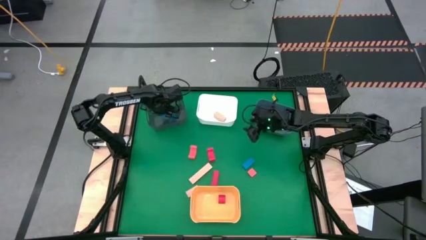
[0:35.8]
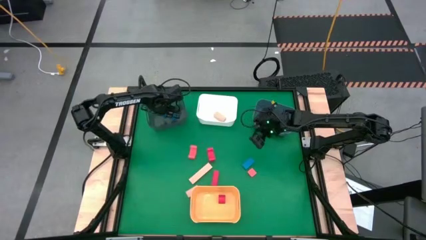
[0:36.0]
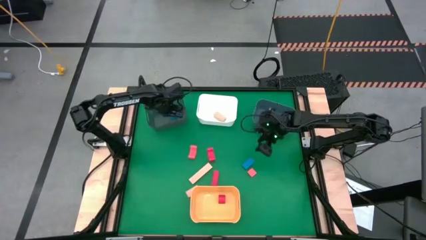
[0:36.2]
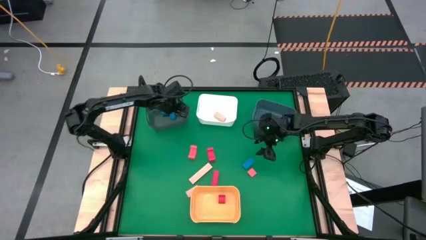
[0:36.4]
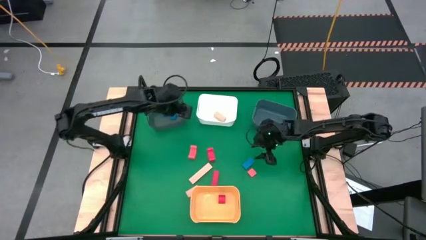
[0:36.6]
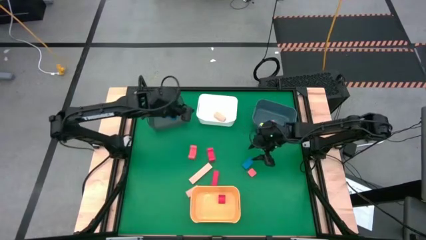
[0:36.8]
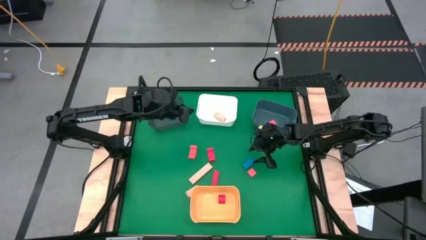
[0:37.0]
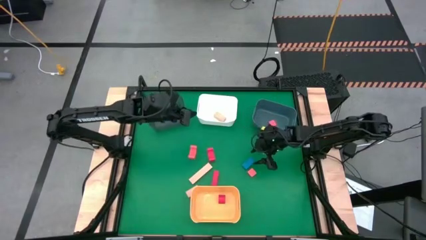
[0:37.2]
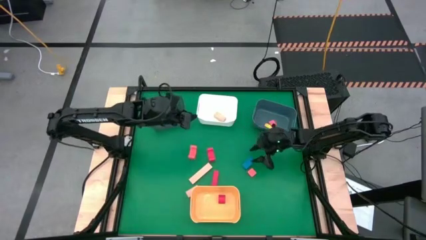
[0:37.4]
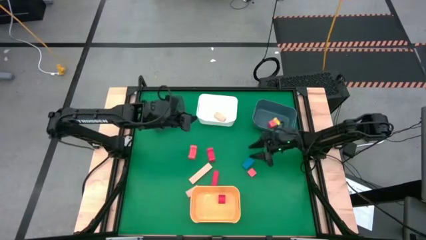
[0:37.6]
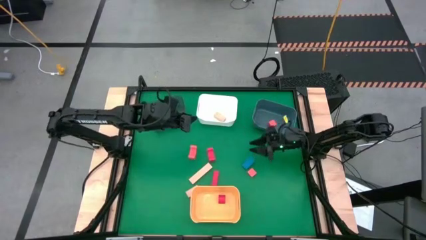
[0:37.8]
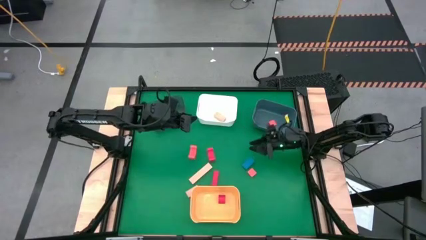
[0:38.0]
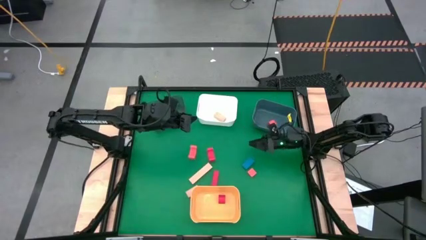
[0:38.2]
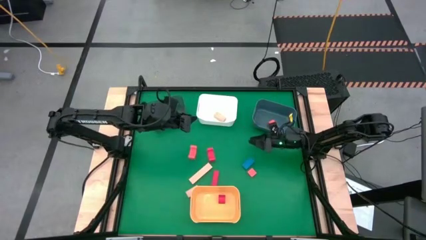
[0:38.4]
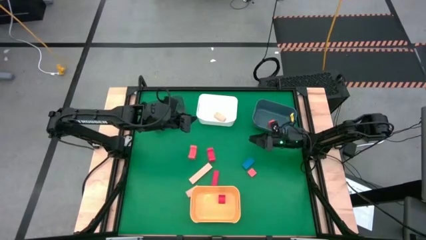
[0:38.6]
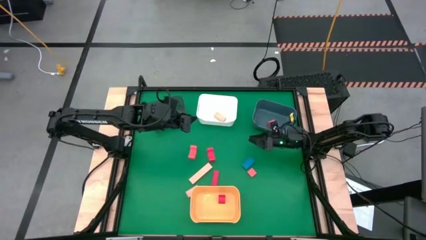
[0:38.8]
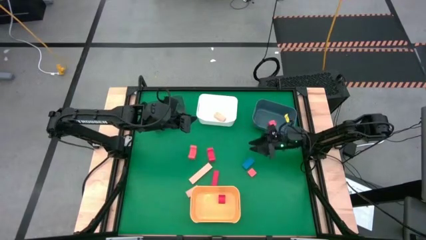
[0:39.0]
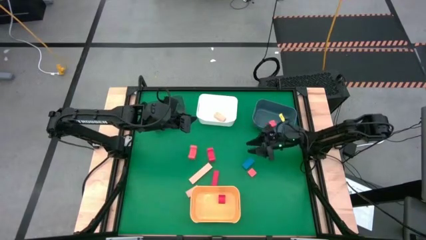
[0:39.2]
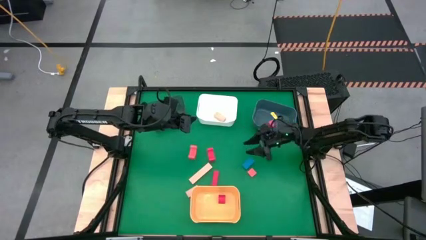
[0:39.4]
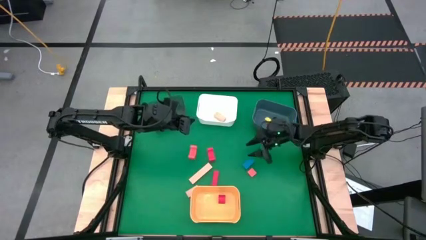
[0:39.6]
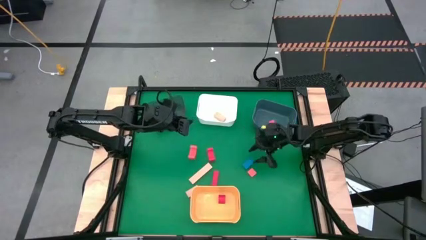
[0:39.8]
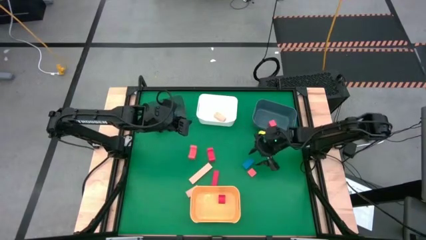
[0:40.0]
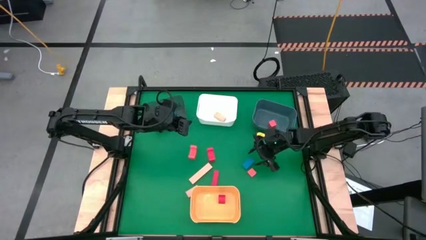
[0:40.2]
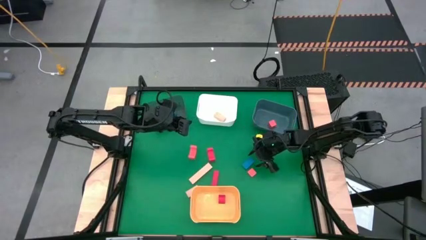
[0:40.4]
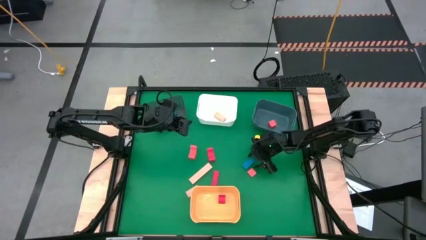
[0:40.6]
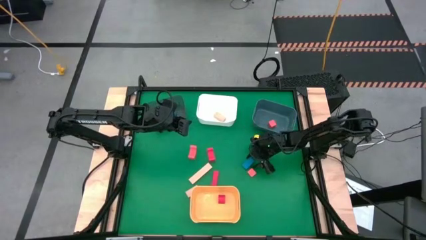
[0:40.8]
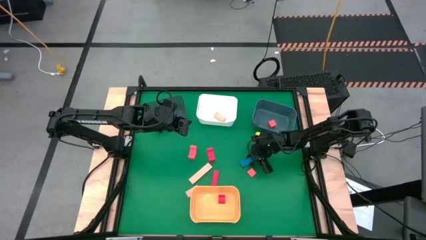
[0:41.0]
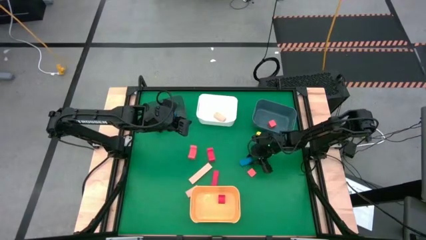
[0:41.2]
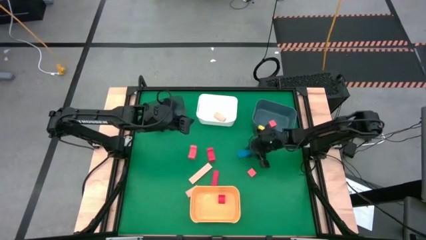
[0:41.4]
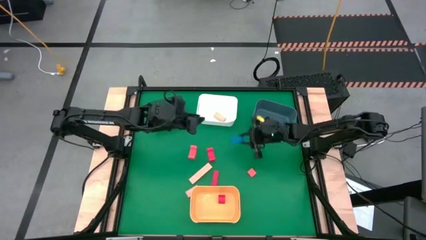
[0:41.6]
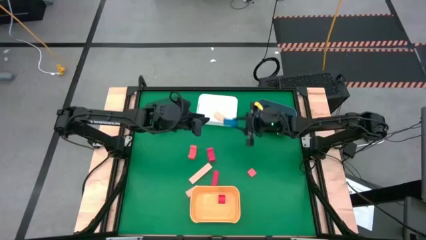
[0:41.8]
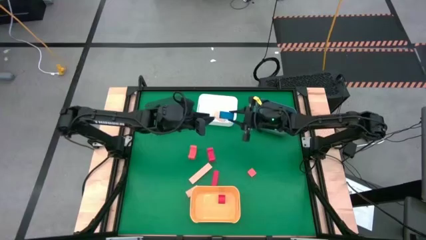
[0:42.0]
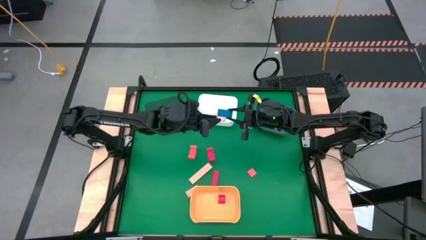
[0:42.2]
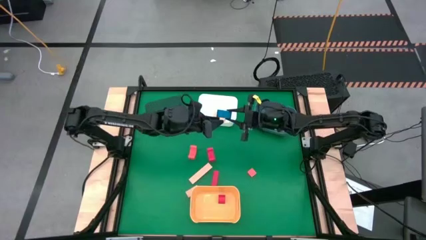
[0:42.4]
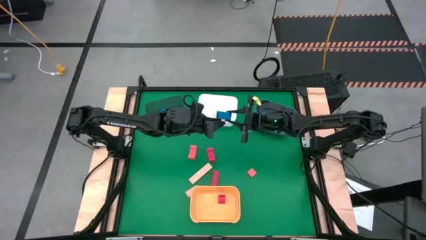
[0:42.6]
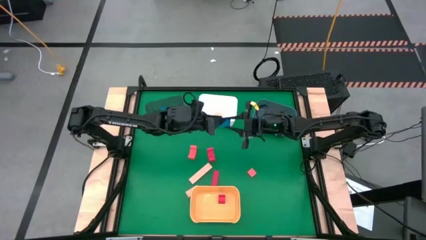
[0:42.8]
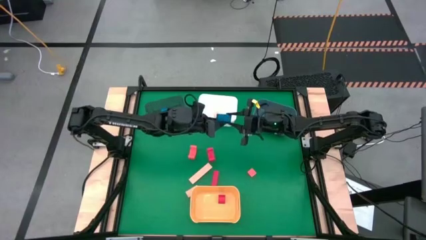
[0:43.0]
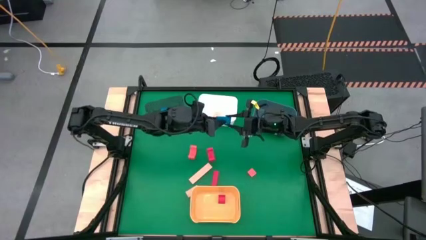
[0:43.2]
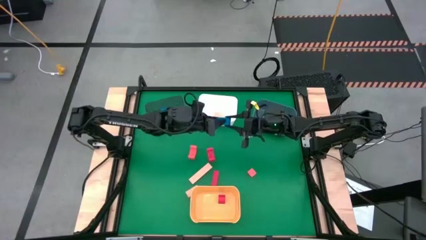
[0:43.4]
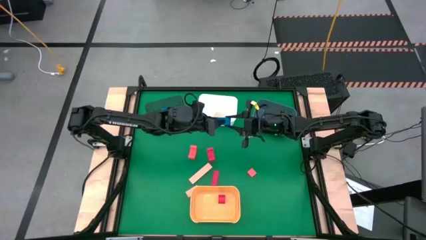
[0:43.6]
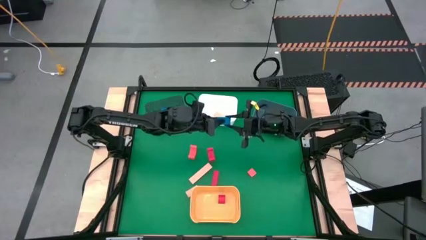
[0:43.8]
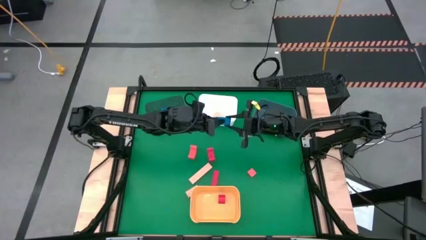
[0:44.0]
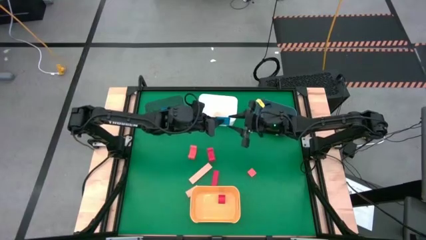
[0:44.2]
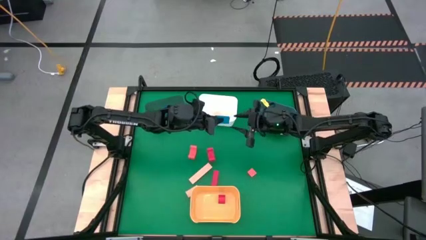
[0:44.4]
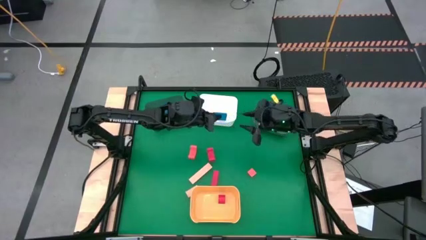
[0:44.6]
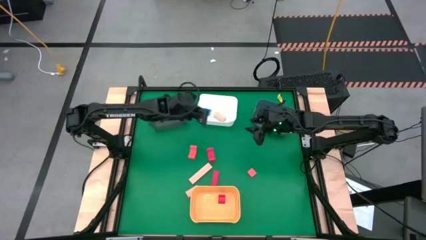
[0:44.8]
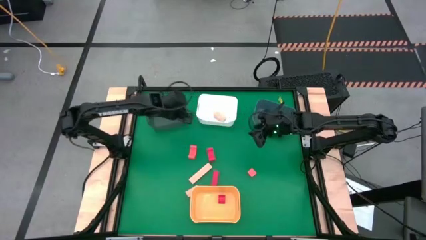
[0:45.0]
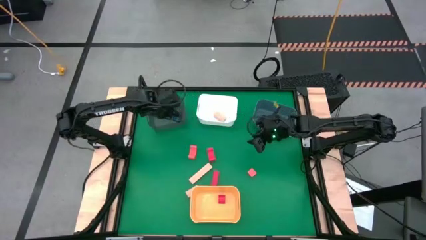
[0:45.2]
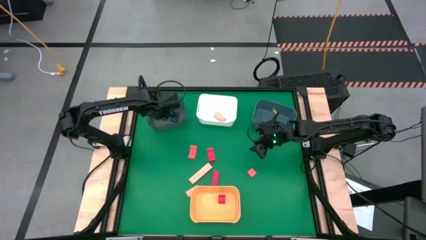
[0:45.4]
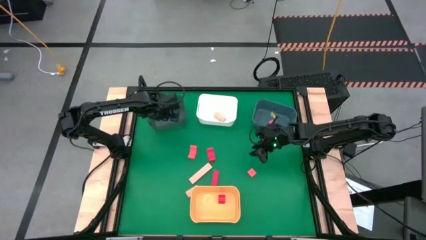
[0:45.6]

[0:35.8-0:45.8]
Task: Sort & place blocks by color
Put the blue block into the black bin

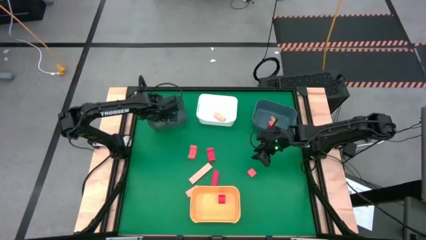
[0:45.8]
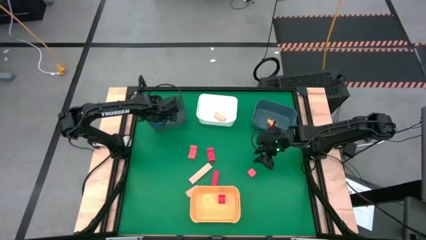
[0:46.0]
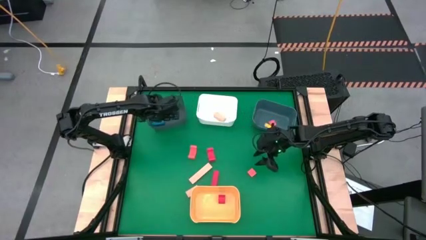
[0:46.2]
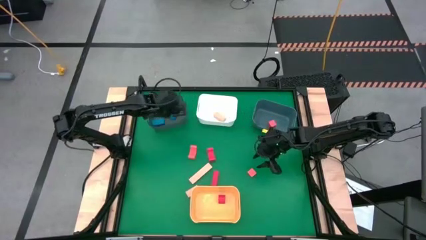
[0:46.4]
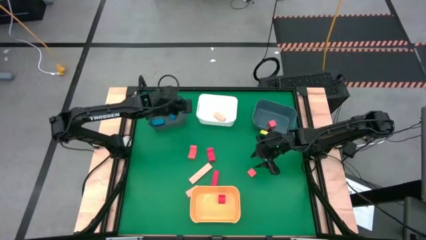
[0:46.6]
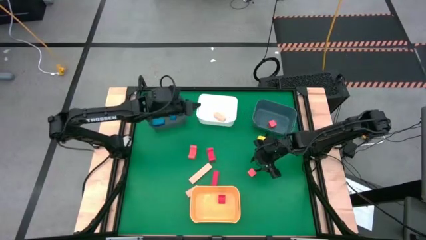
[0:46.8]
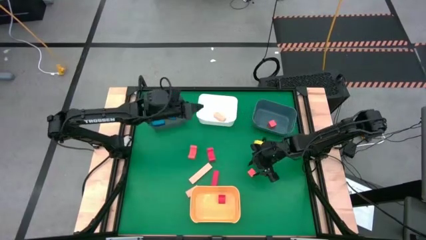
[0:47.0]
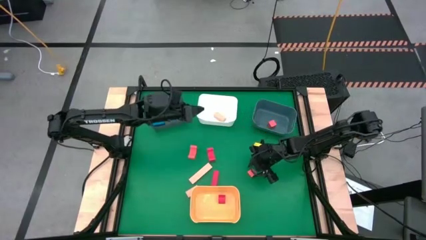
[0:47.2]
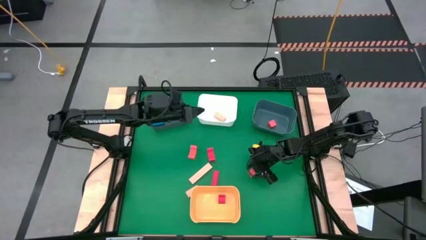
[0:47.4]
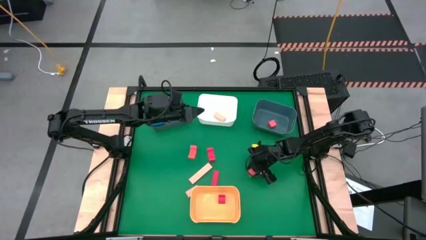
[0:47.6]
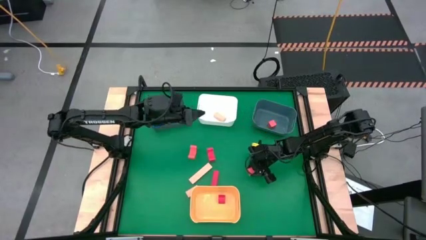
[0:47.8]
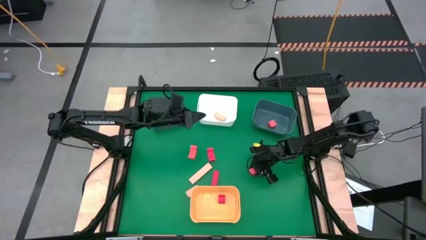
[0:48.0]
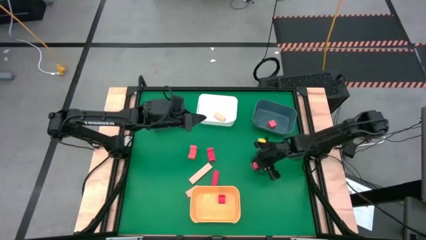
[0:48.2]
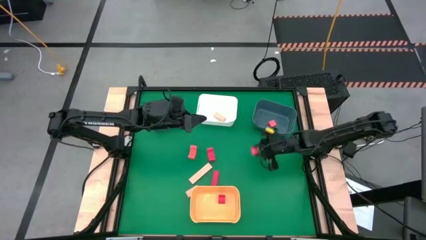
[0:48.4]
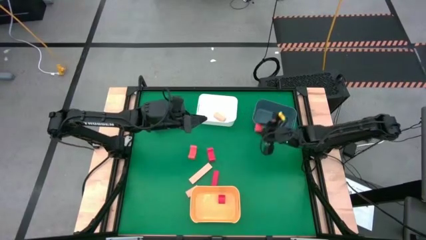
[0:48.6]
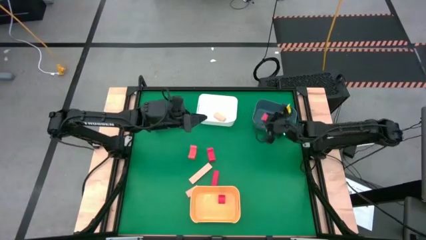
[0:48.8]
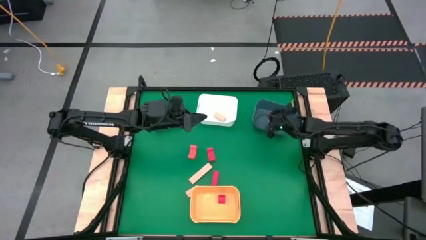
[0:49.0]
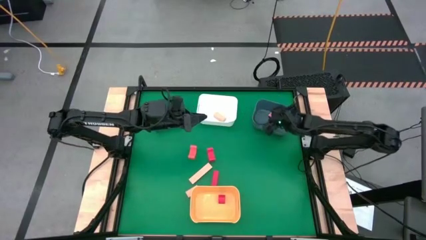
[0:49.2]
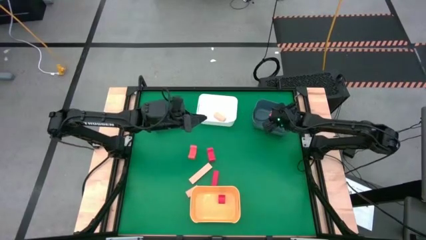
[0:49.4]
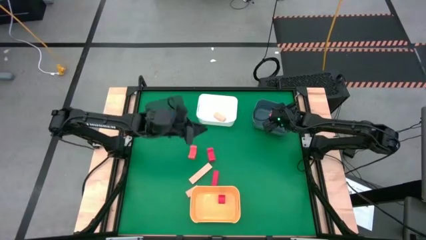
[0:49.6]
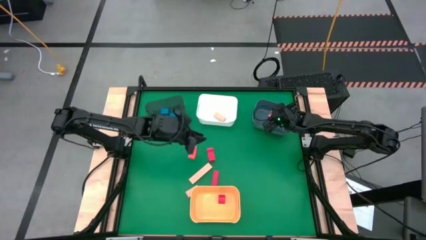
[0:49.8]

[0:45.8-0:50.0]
Put the orange block into the blue bin
